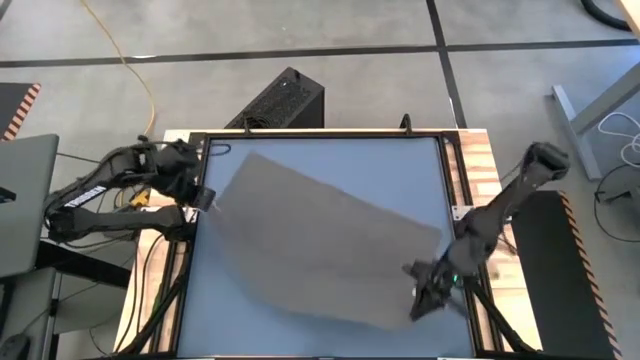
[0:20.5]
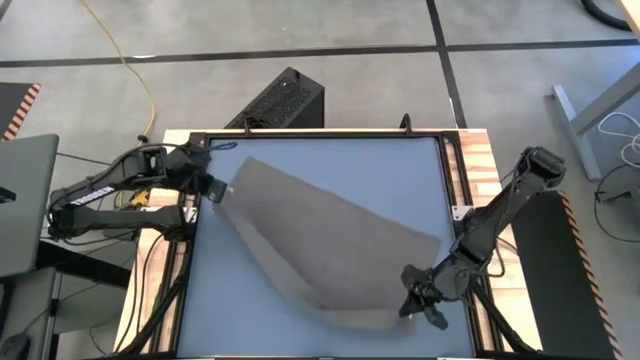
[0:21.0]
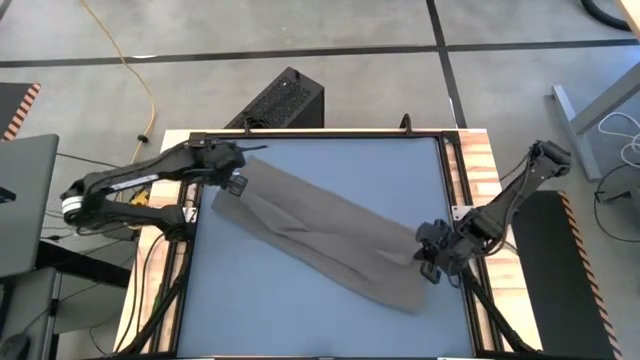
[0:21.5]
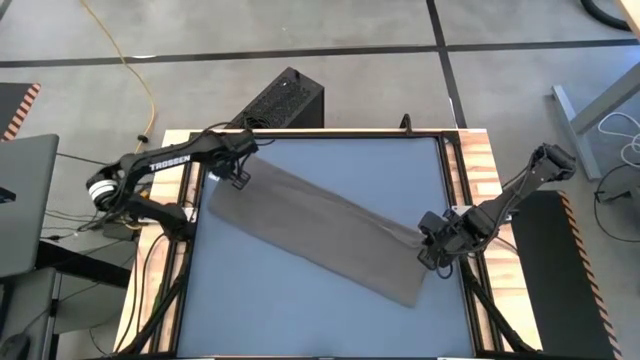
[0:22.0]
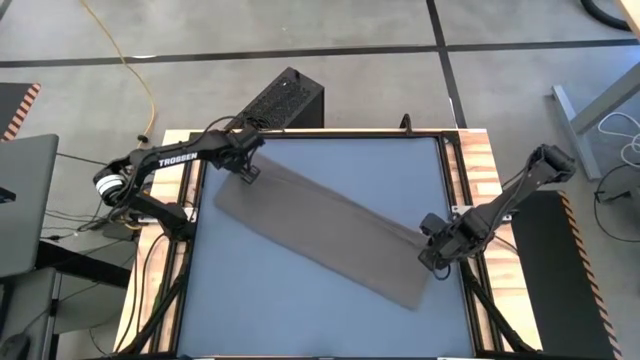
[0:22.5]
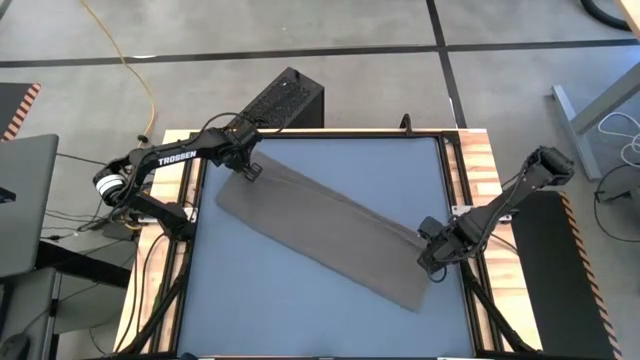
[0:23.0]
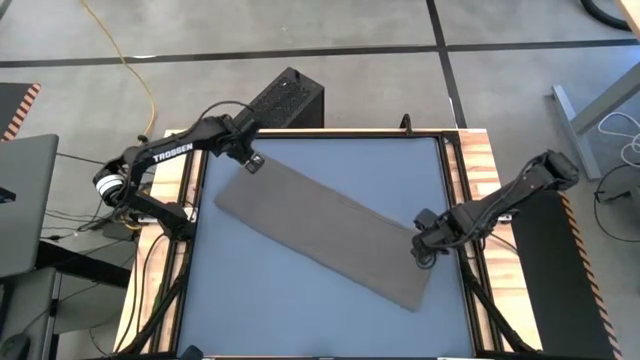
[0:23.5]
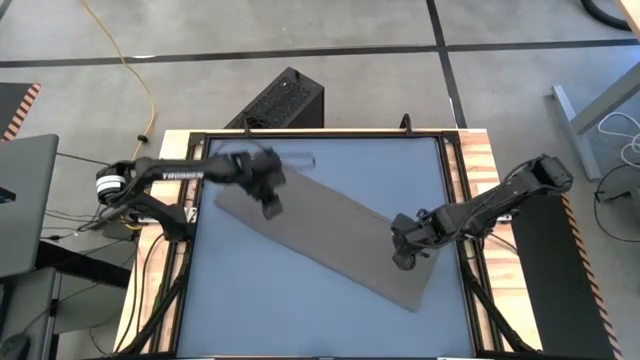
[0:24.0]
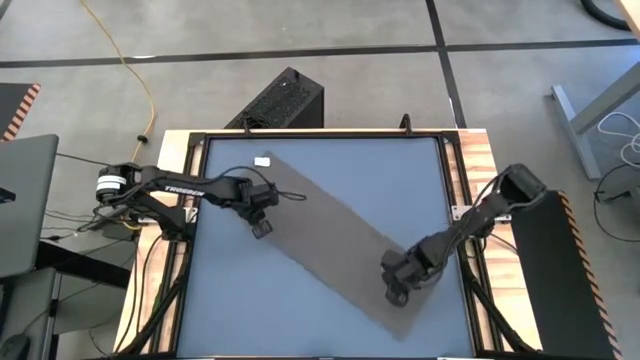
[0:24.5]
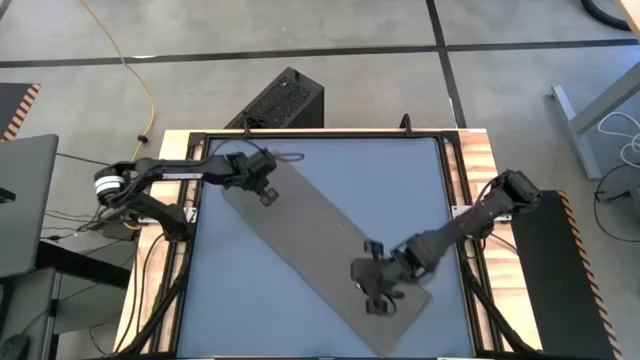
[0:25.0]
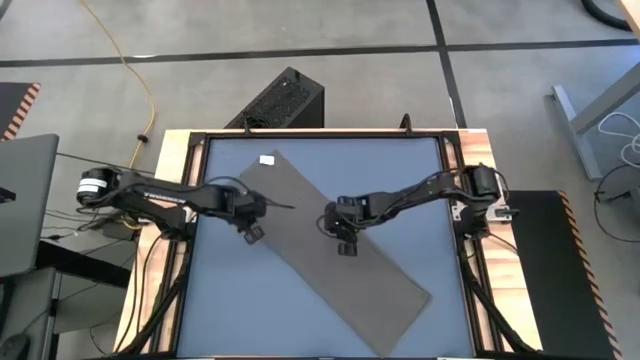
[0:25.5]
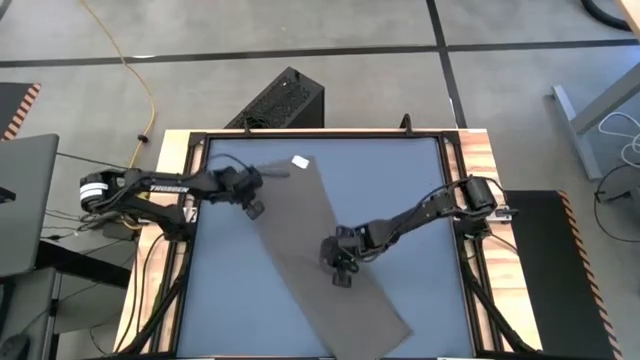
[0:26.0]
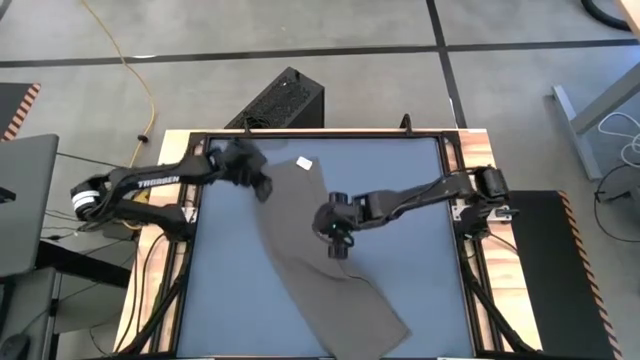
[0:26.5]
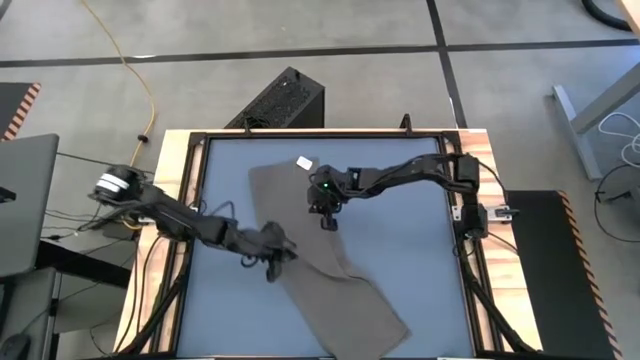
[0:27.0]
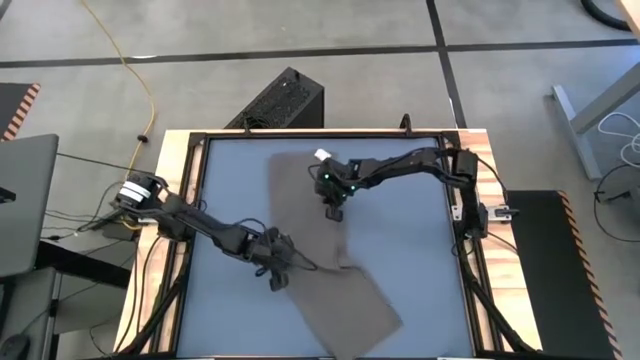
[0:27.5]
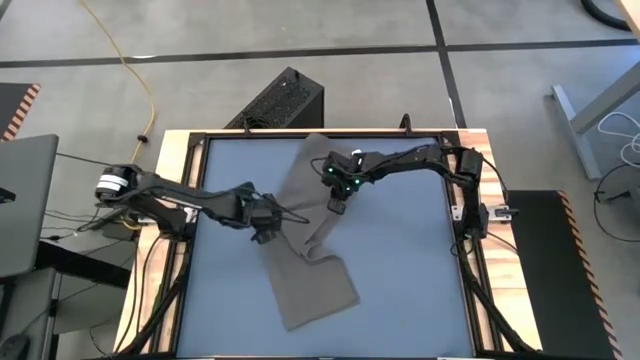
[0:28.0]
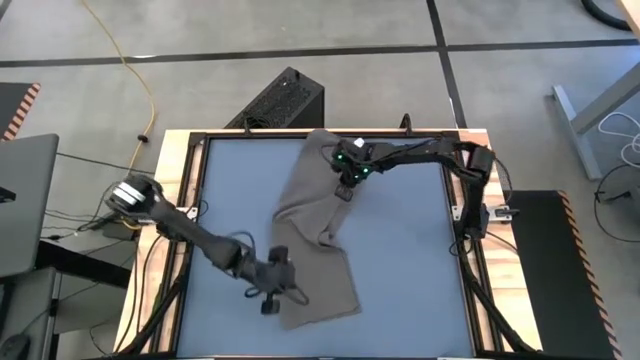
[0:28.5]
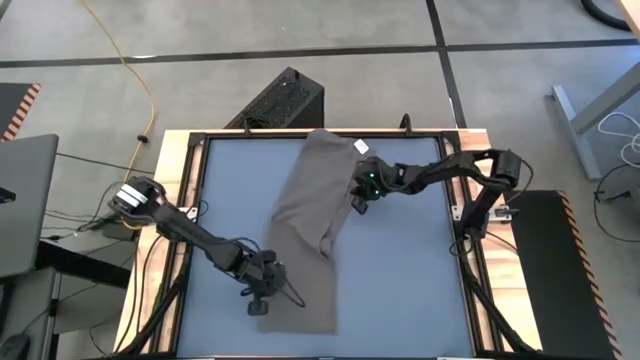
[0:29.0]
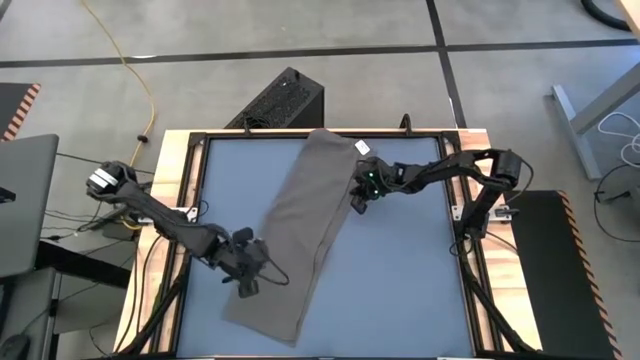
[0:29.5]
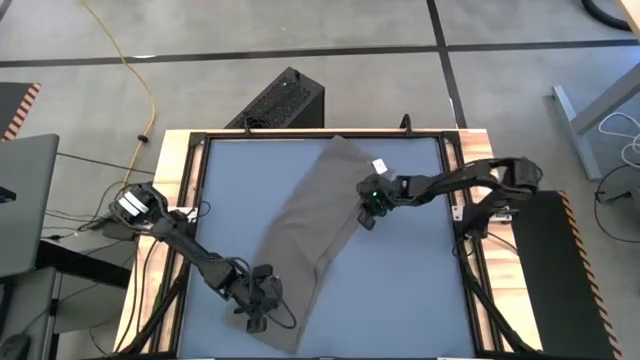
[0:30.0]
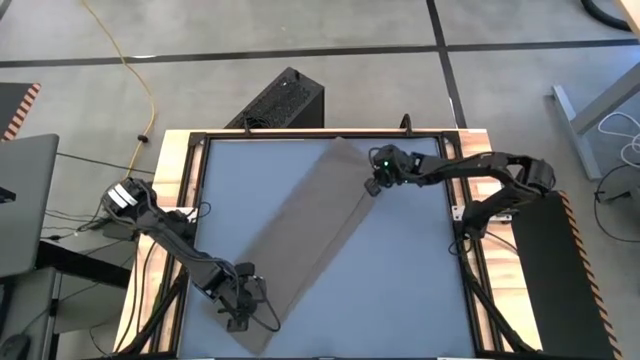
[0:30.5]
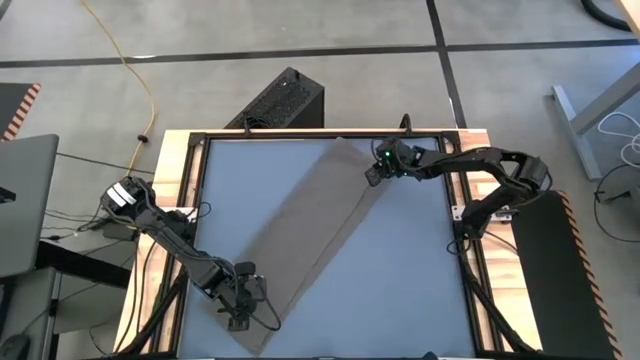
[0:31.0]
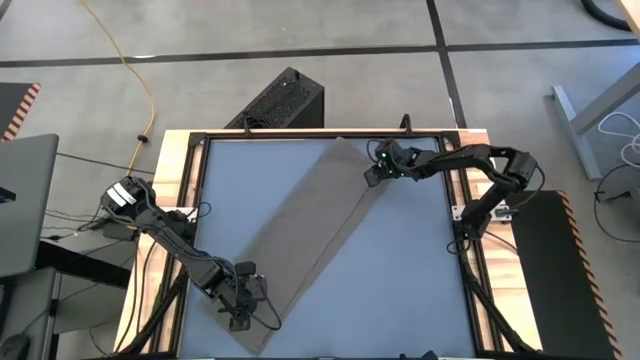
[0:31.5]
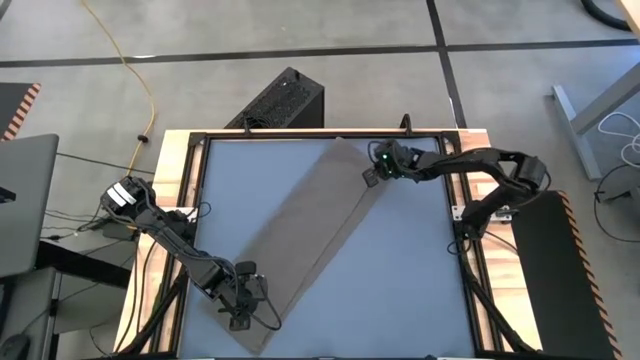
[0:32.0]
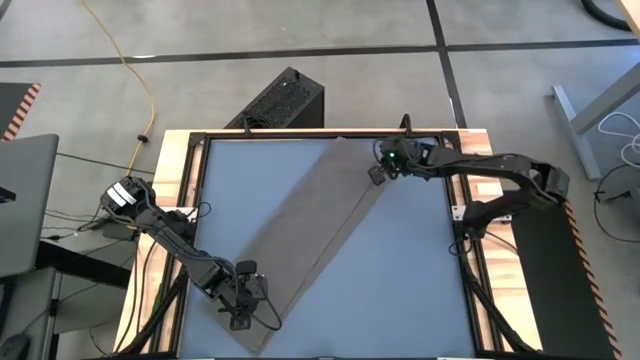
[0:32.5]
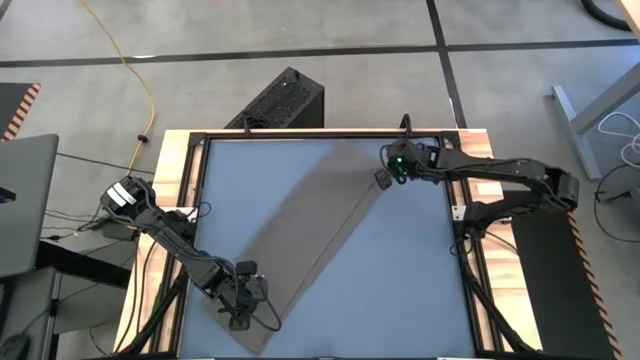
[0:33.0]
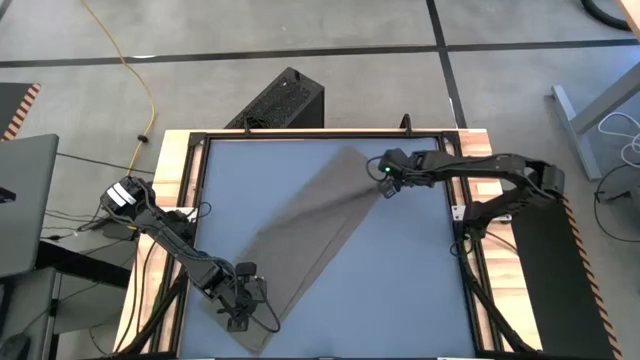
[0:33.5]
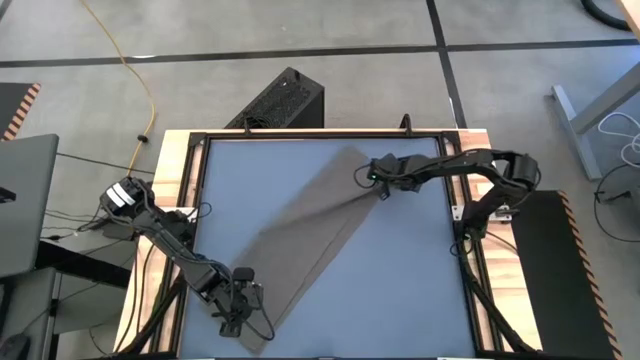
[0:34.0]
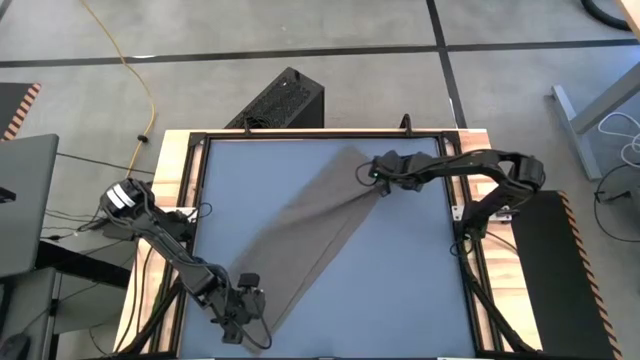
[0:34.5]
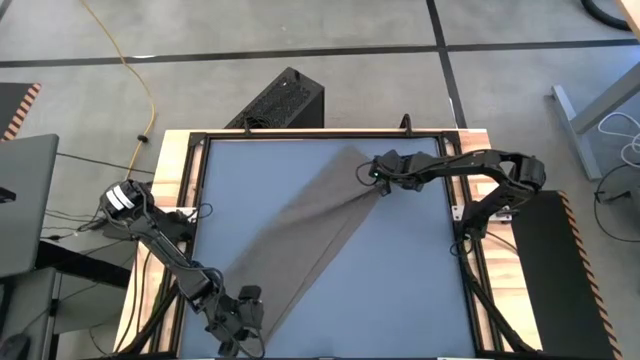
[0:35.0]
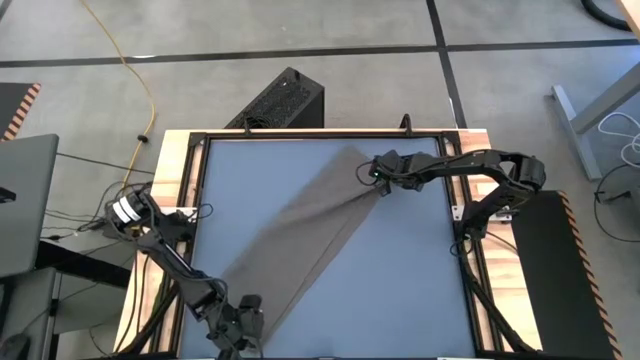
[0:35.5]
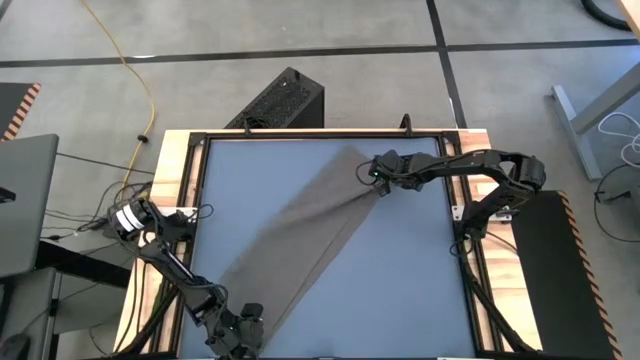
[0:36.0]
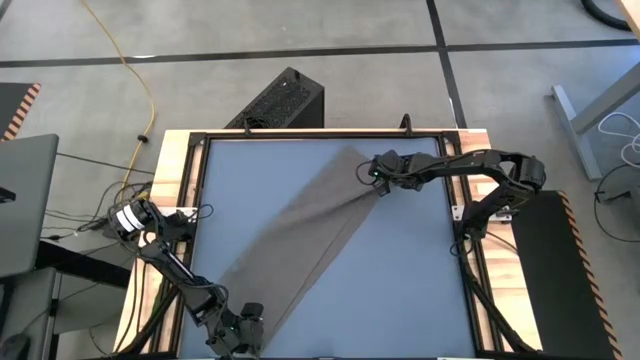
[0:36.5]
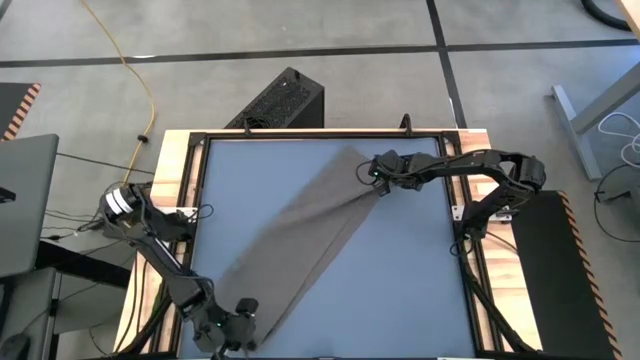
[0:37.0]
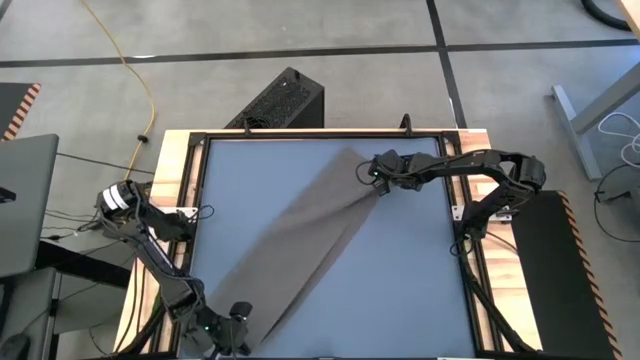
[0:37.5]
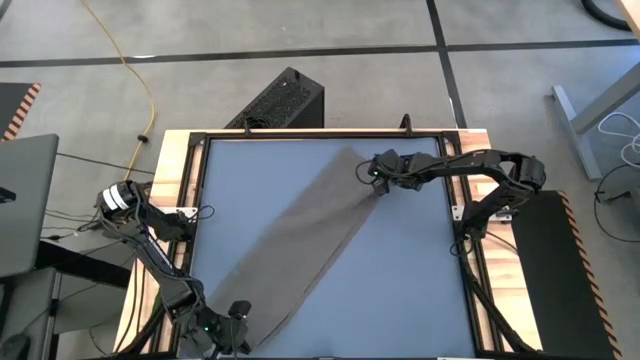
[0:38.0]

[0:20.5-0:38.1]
Task: Roll towel
Roll the gray towel

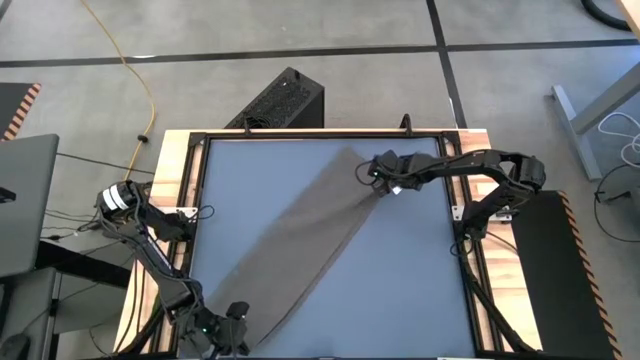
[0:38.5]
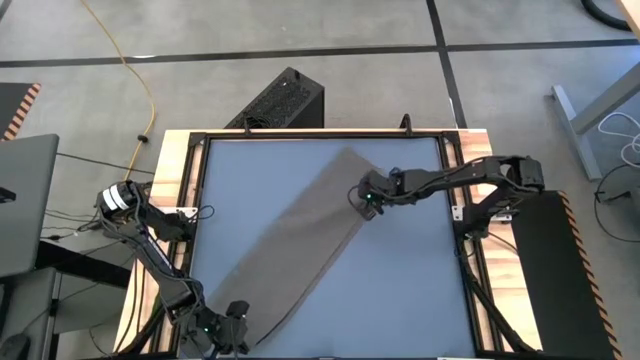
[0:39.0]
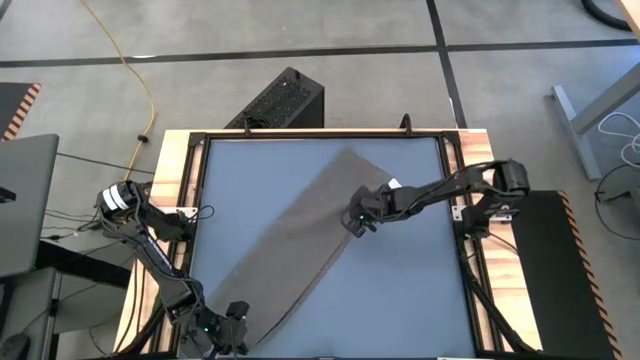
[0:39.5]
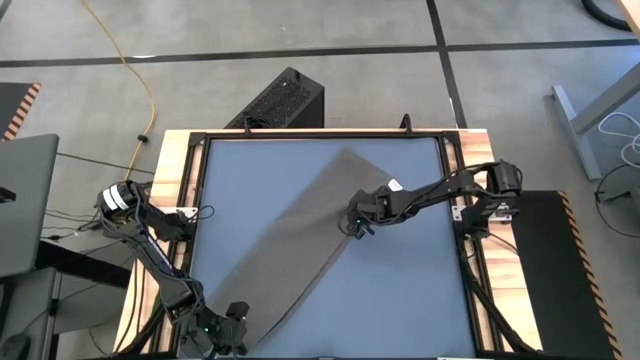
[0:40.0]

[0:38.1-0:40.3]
Roll the gray towel

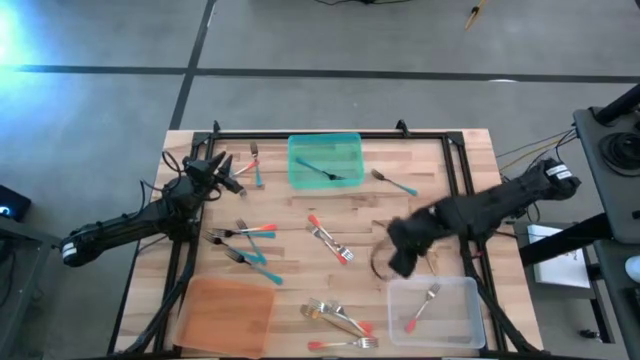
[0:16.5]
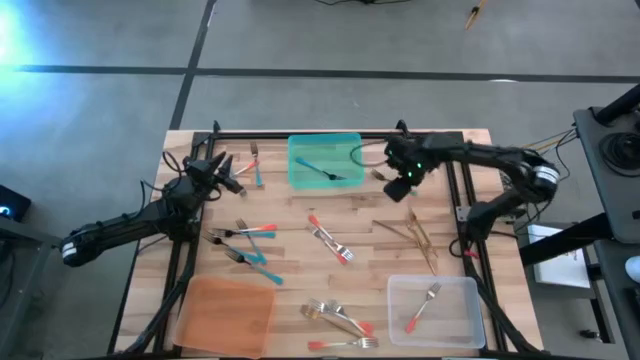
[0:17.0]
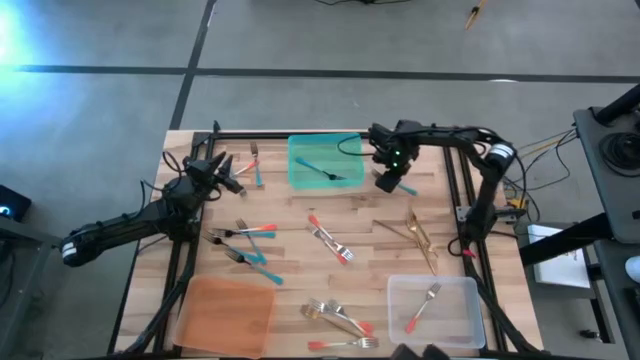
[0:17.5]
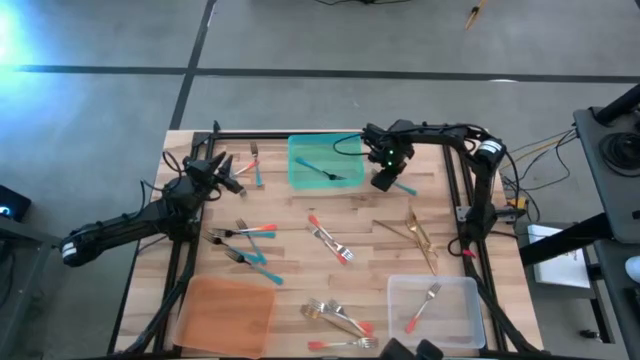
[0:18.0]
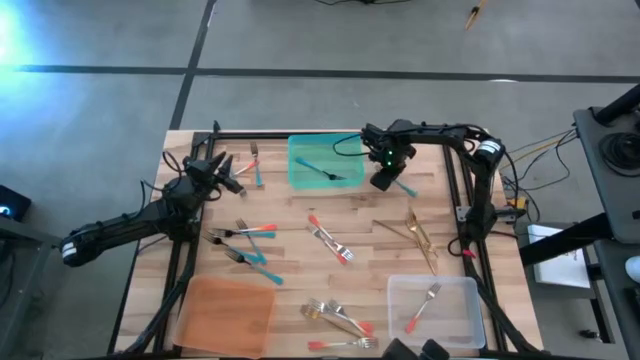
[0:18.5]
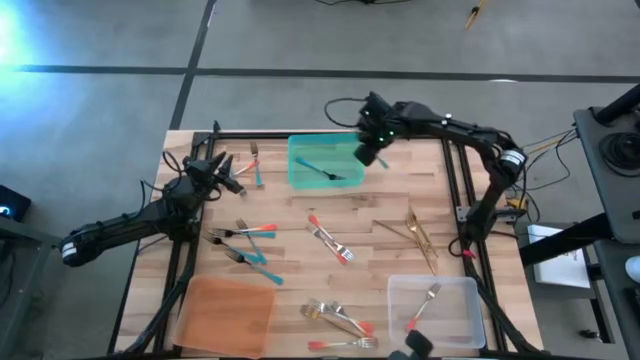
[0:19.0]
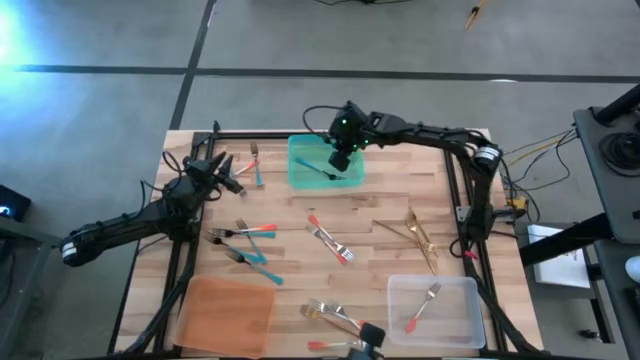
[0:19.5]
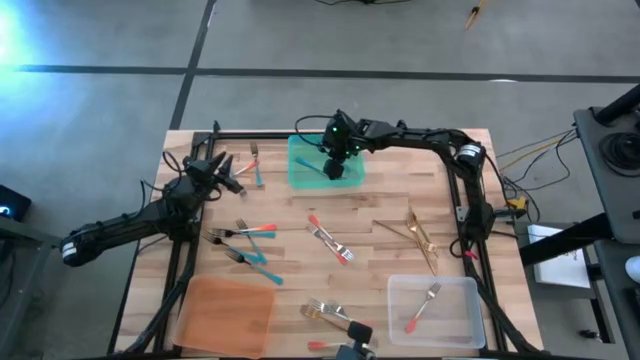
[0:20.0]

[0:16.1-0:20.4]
Task: Sort silverware by color (type)
Put the blue fork into the blue bin
